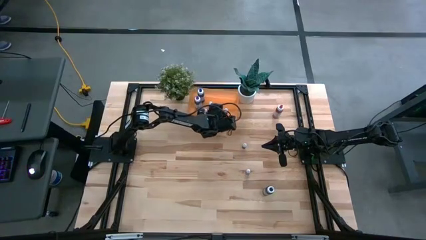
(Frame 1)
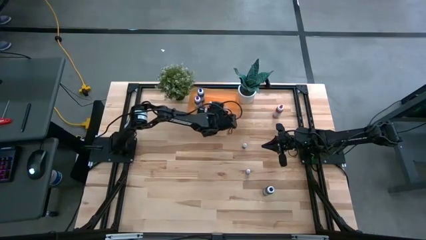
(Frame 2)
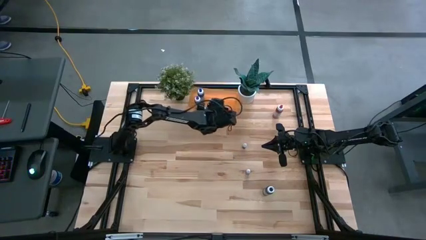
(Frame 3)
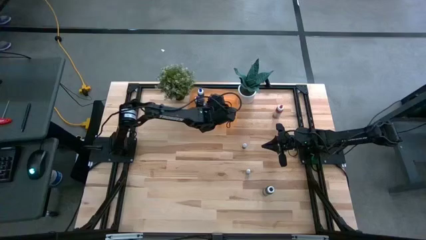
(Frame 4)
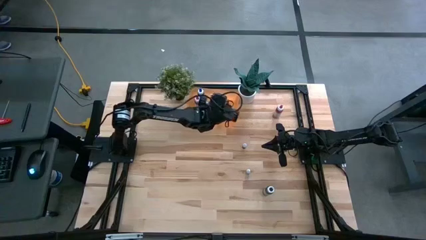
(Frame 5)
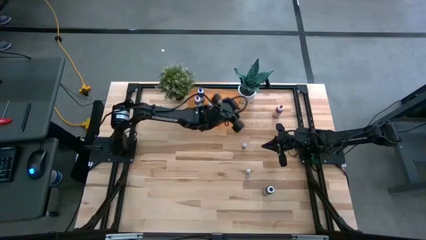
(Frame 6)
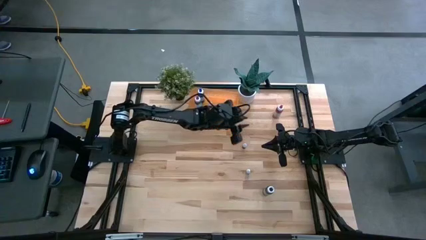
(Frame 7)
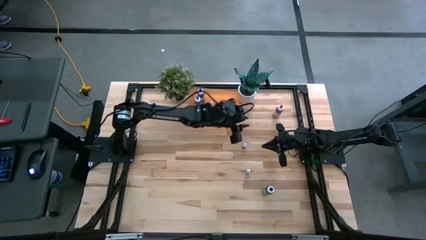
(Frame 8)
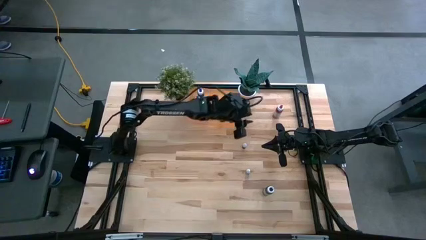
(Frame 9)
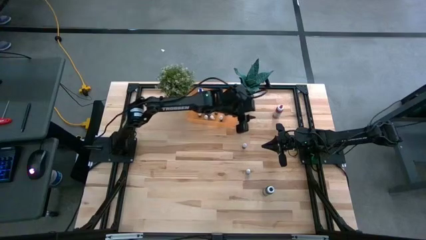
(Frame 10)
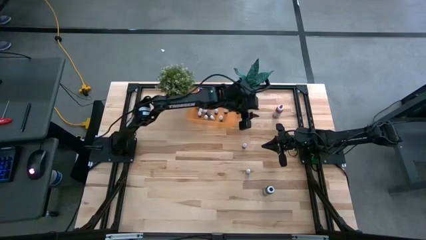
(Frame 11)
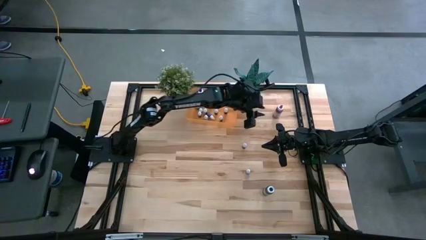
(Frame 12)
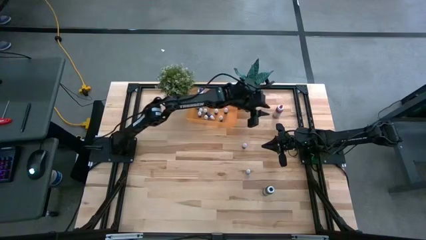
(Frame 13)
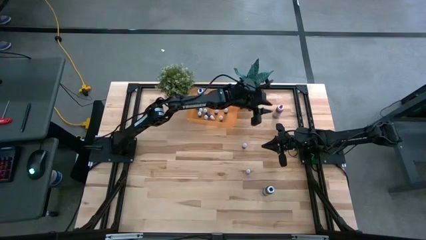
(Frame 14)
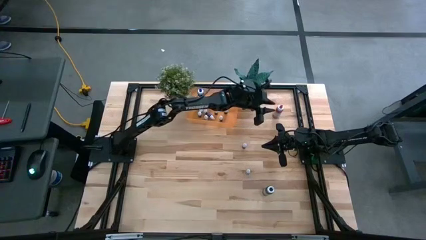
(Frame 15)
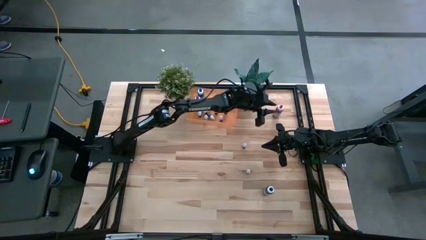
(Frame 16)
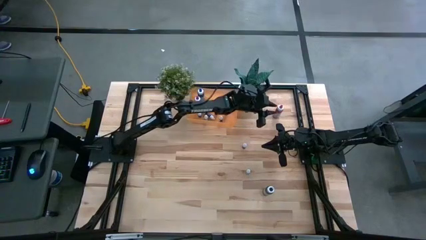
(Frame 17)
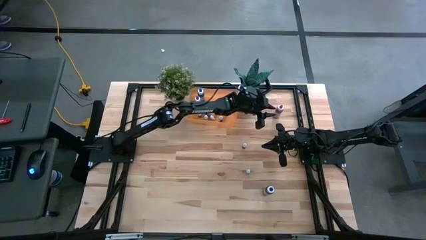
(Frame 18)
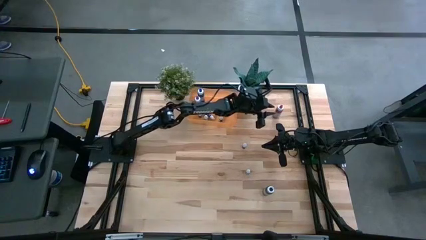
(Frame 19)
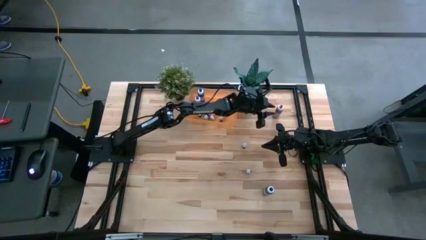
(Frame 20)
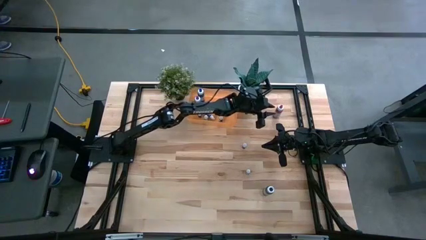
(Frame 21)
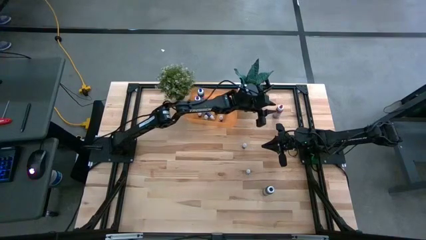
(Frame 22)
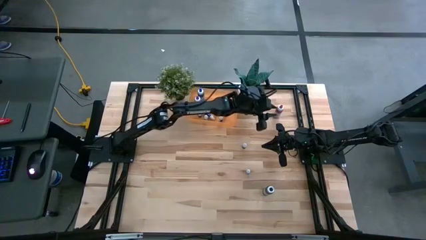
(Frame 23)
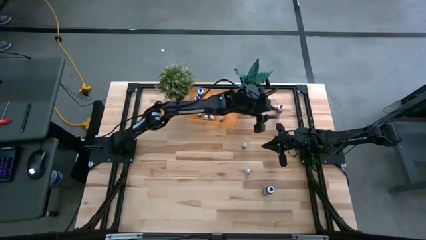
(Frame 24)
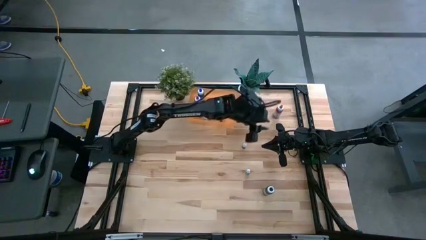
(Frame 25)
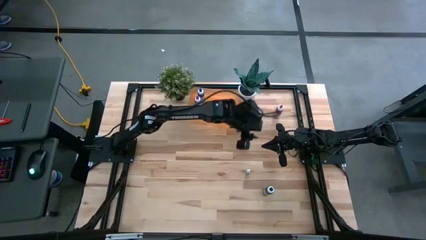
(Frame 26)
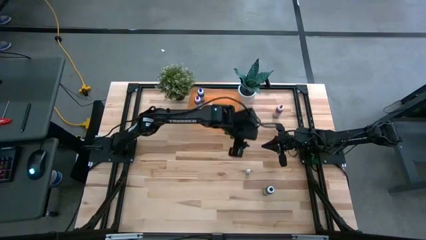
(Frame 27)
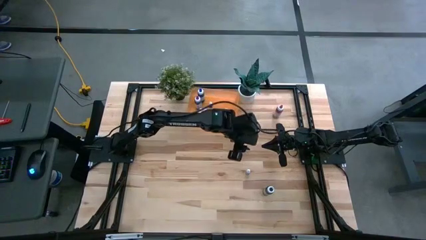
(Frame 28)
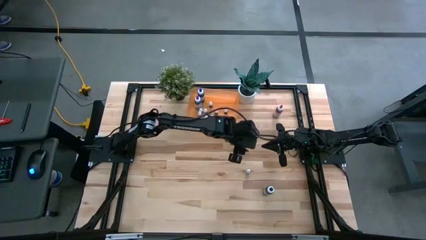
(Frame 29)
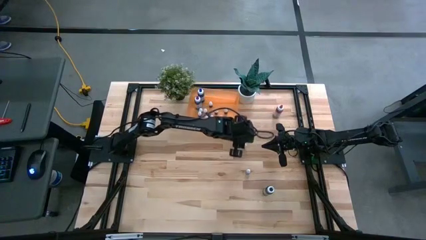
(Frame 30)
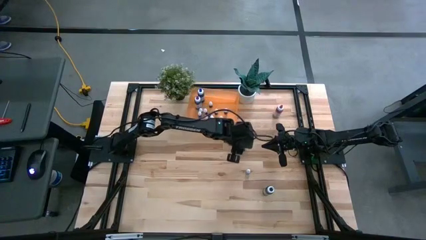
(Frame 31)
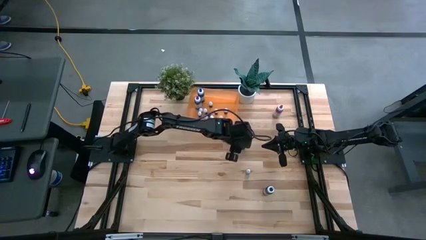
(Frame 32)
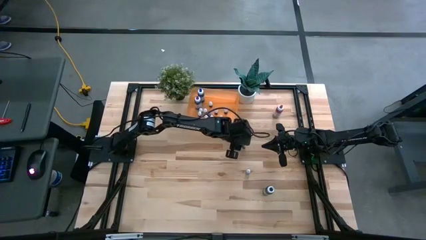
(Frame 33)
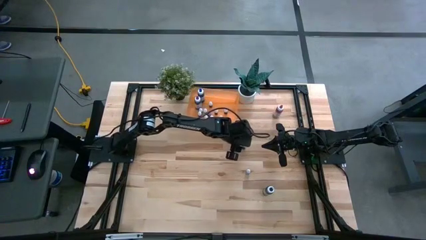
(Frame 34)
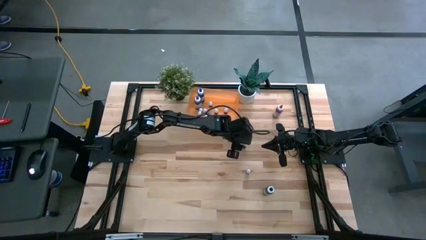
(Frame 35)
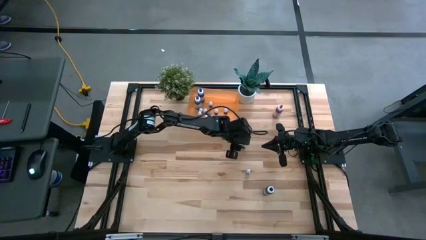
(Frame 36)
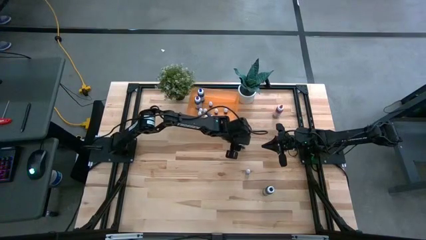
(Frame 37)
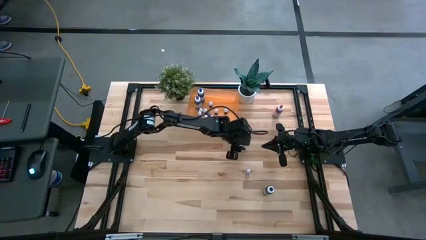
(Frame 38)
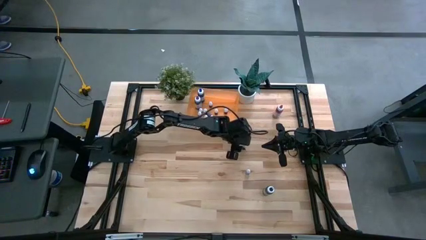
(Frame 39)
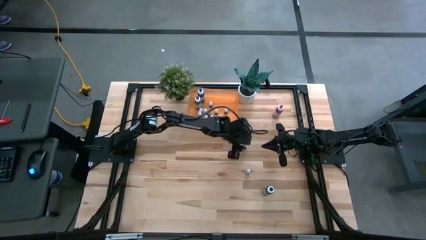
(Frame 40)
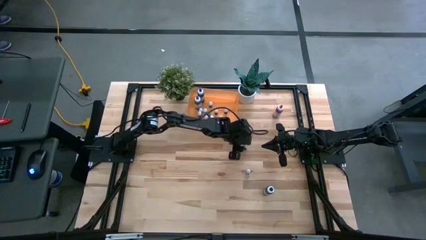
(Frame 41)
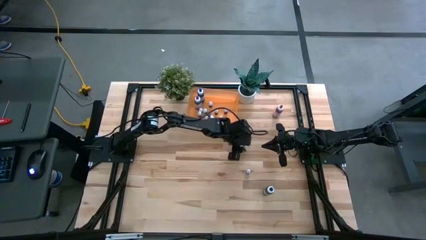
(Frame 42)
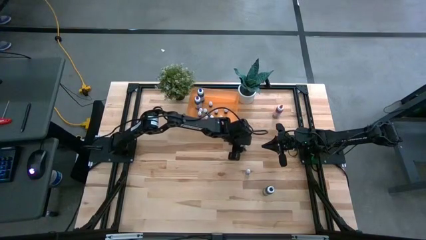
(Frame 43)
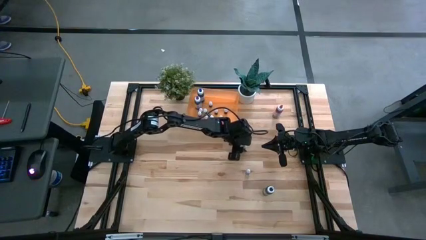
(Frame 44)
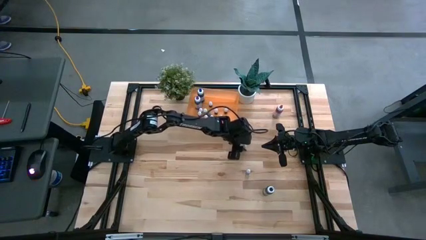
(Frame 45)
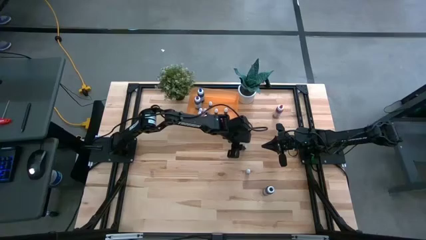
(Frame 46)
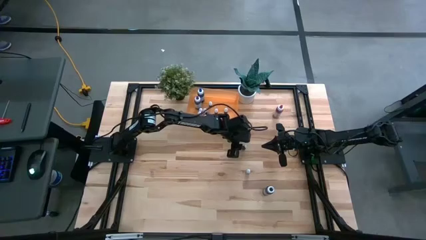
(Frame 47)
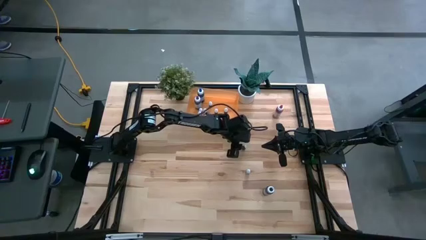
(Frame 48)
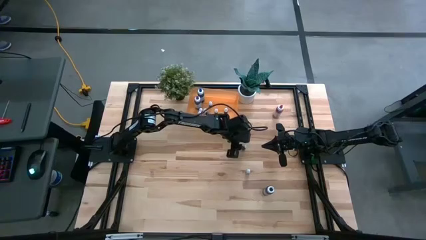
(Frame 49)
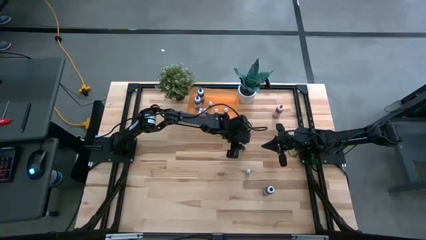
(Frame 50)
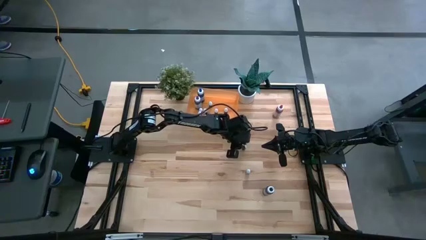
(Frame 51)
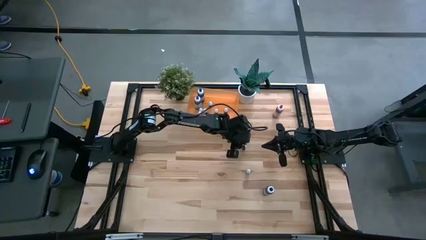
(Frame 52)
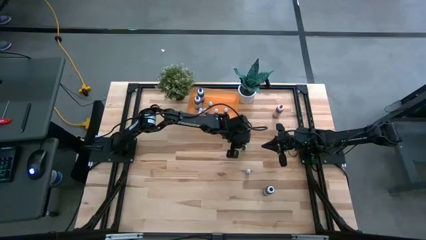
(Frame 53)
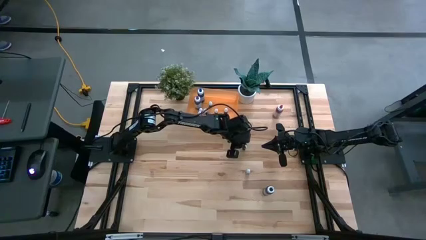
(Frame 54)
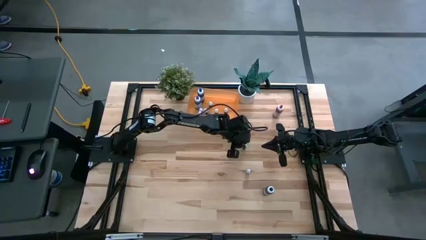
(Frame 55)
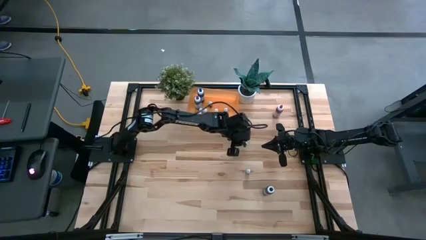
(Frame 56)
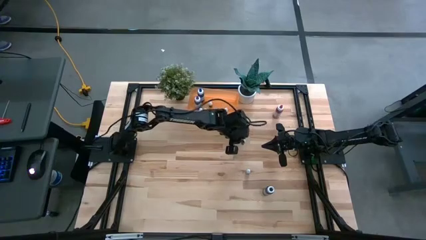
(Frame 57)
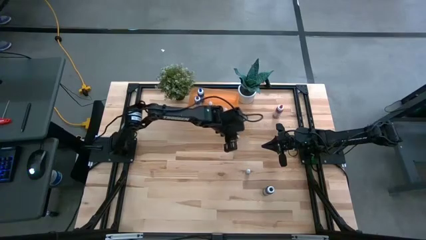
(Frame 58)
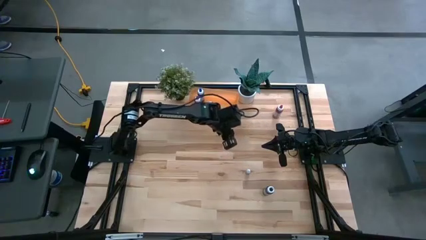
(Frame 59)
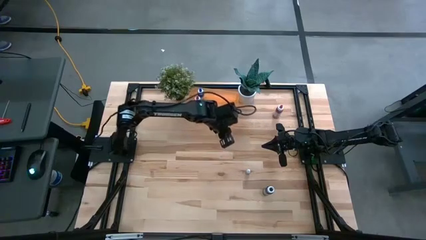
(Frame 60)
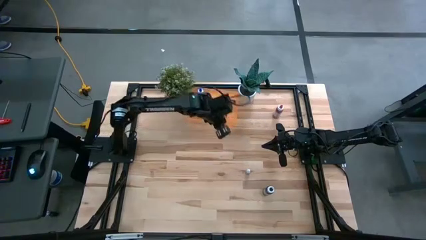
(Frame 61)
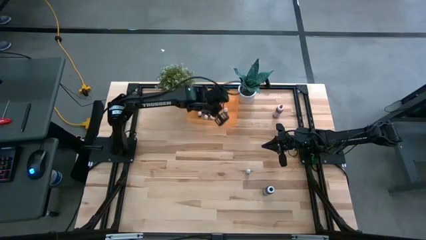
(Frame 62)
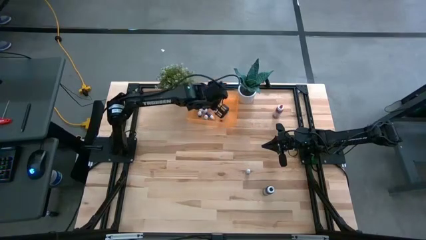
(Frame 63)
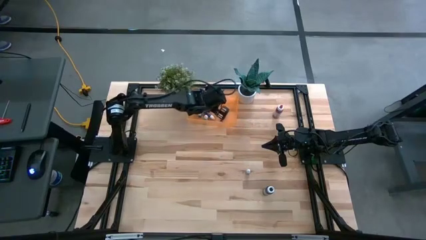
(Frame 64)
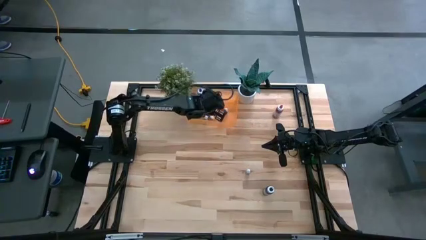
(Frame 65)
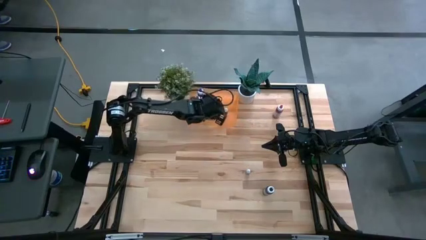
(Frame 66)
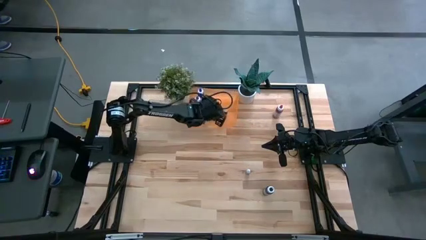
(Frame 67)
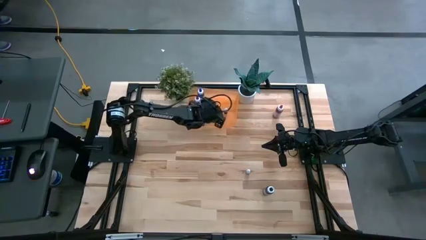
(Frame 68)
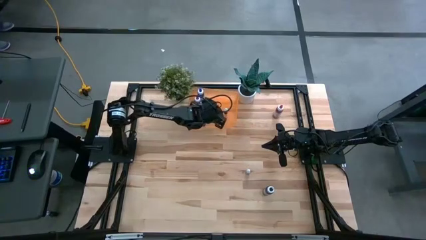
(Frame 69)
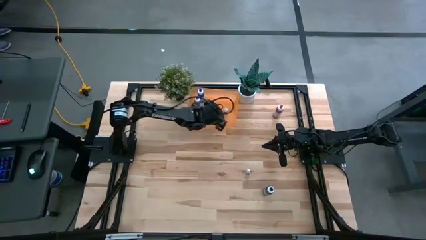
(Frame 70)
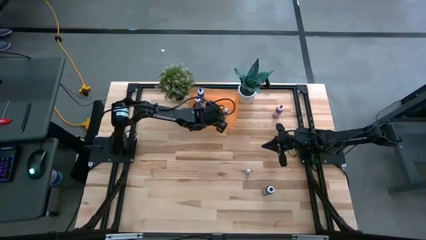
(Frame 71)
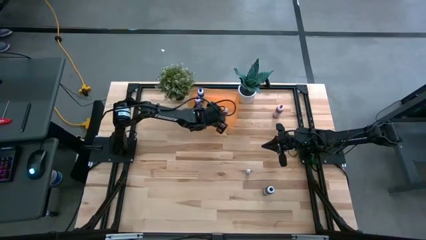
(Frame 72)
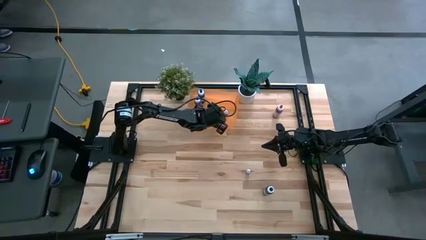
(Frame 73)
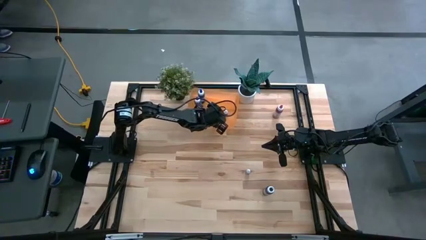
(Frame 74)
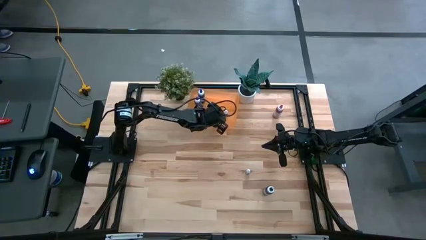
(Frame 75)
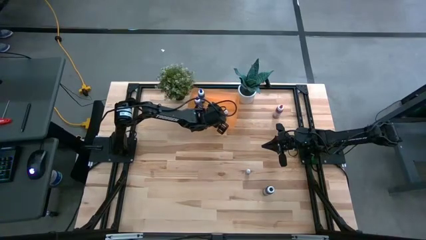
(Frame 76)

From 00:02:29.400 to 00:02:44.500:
Task: Pick & Place food coloring
Put the small black bottle into the bin
